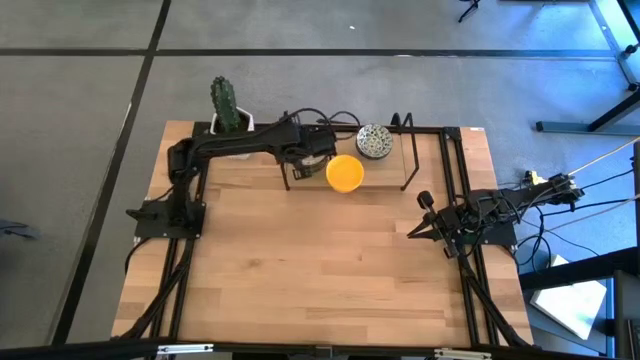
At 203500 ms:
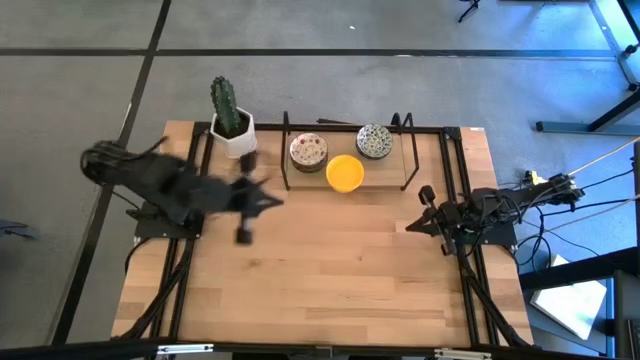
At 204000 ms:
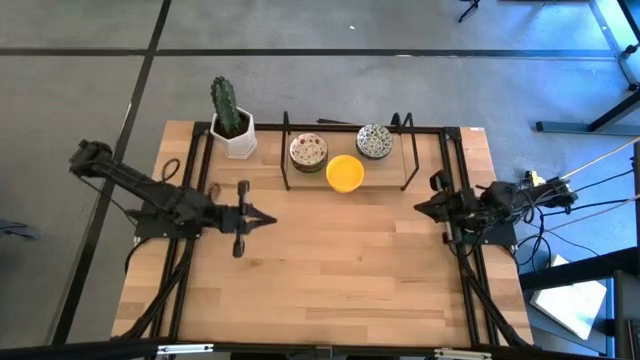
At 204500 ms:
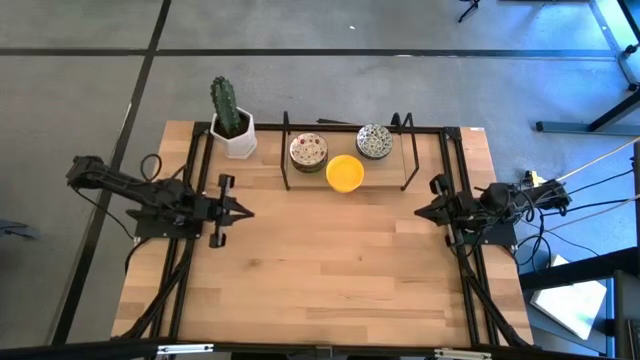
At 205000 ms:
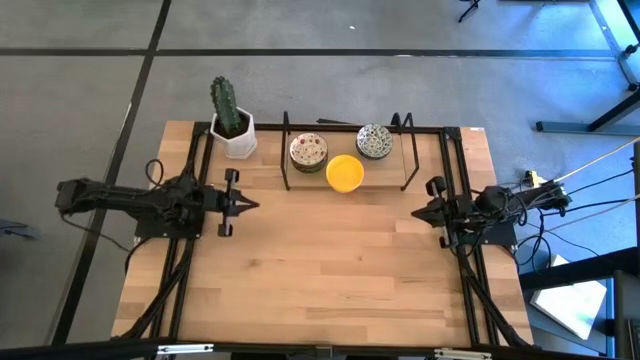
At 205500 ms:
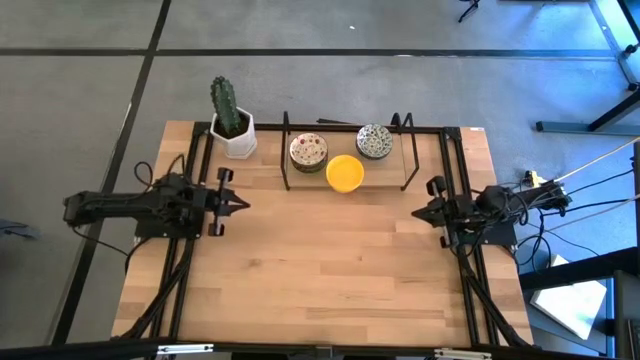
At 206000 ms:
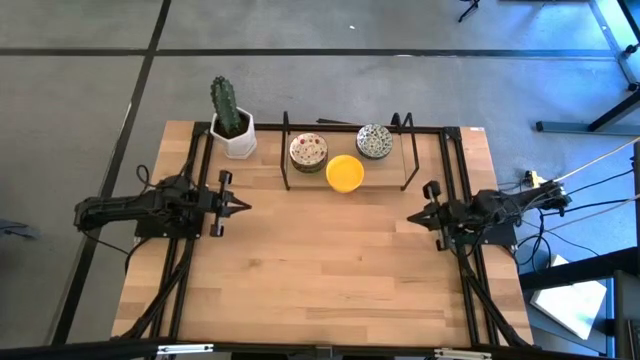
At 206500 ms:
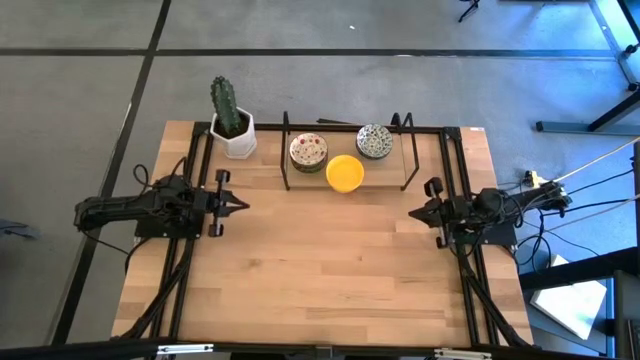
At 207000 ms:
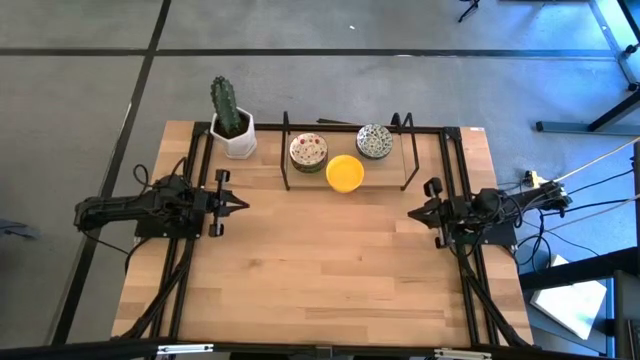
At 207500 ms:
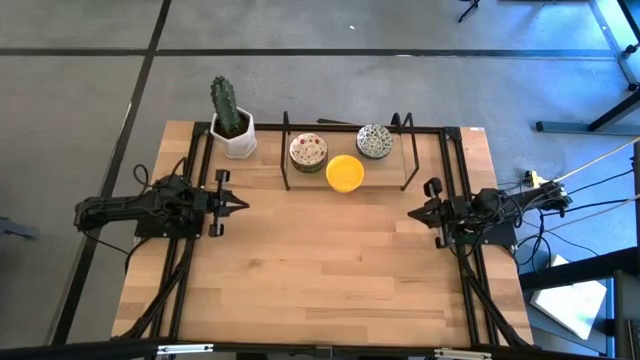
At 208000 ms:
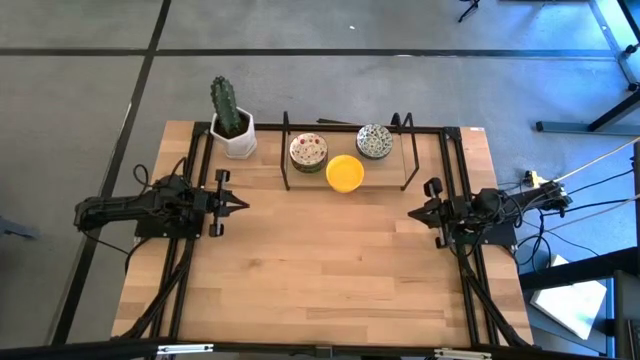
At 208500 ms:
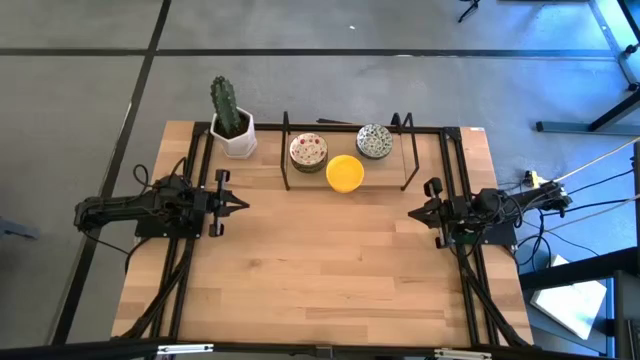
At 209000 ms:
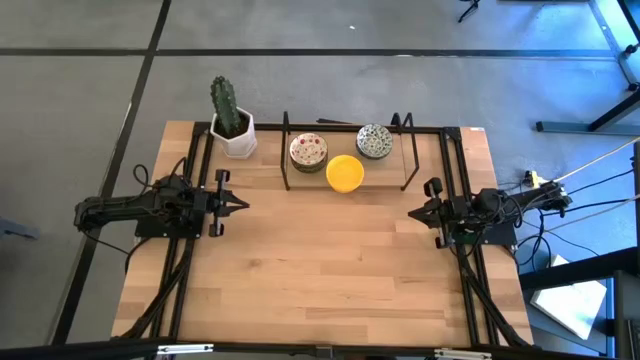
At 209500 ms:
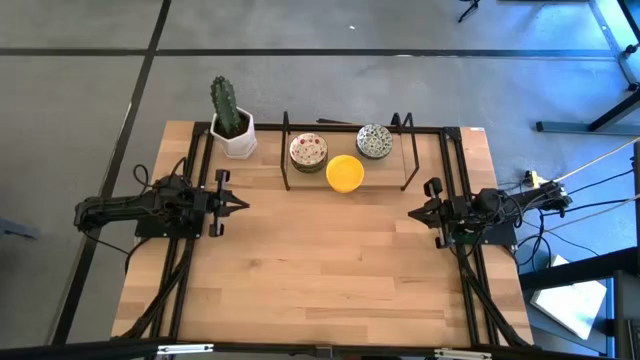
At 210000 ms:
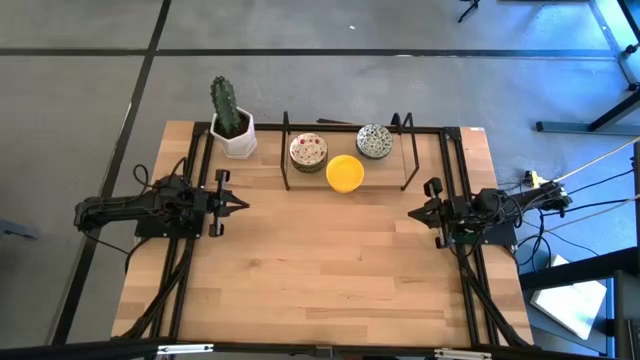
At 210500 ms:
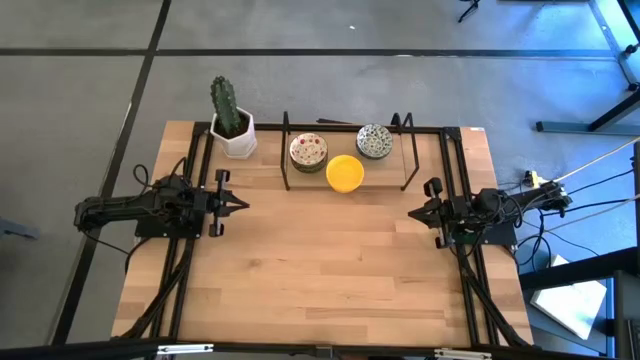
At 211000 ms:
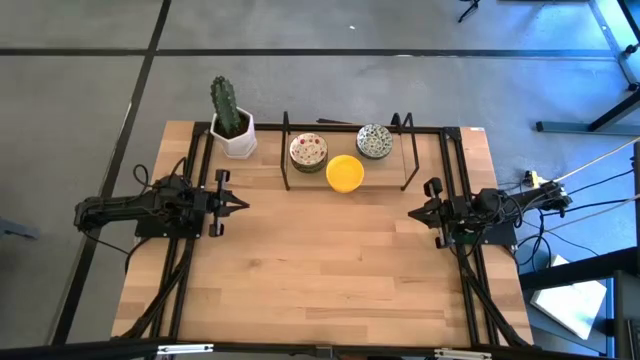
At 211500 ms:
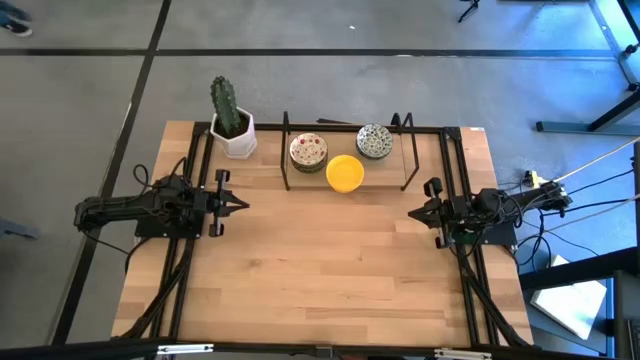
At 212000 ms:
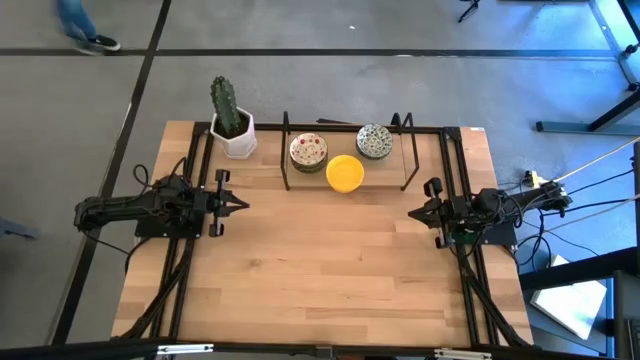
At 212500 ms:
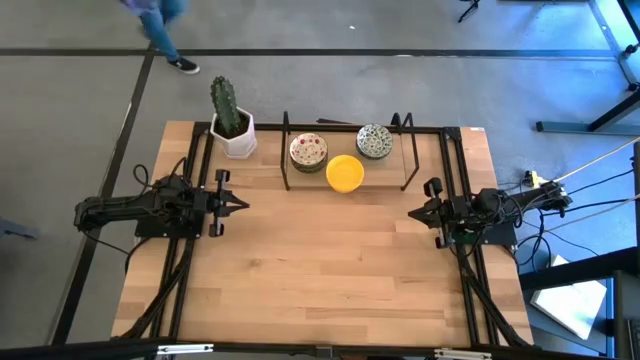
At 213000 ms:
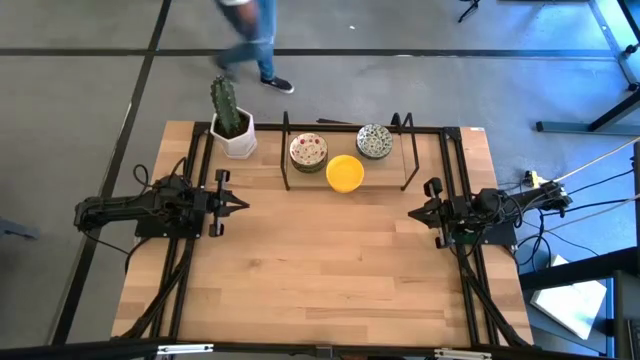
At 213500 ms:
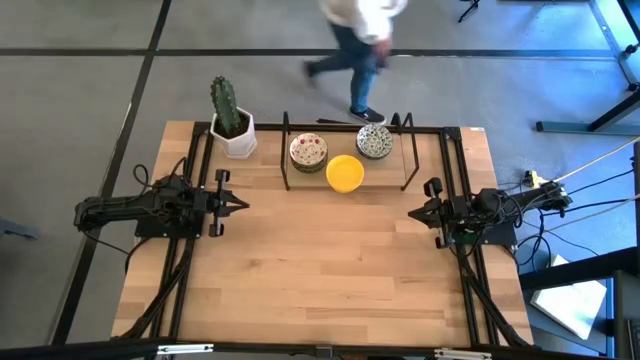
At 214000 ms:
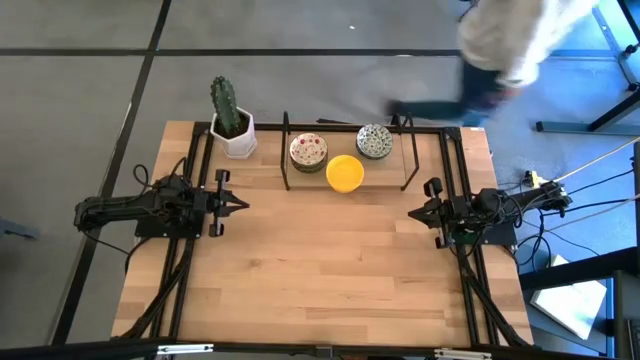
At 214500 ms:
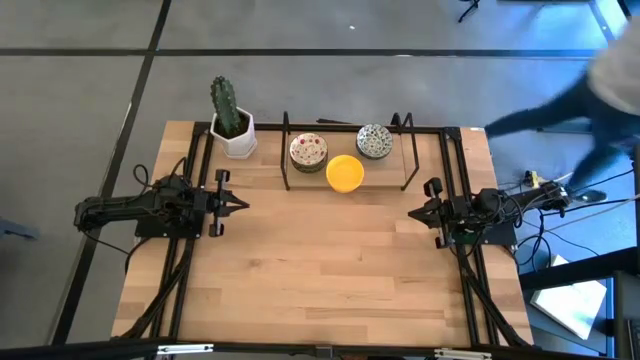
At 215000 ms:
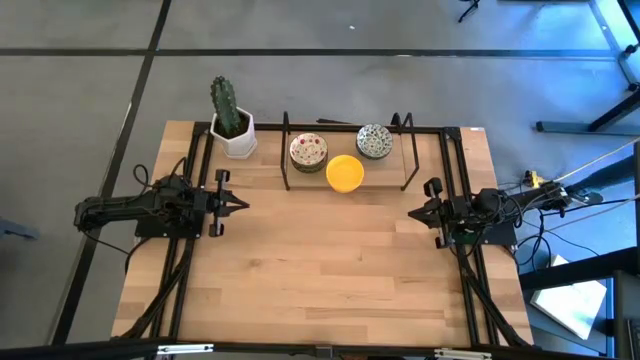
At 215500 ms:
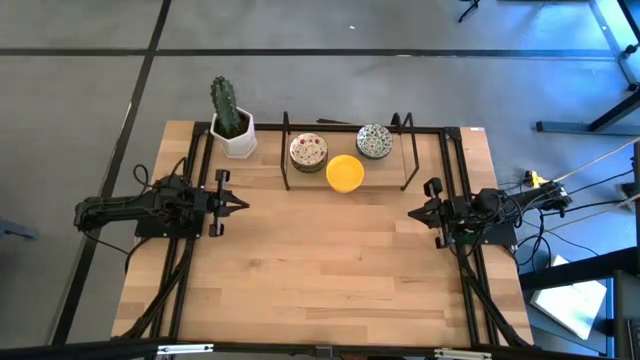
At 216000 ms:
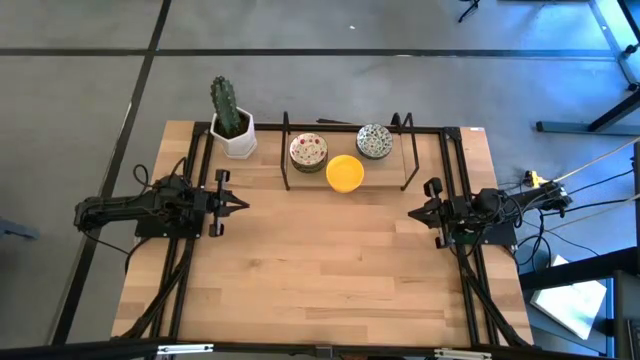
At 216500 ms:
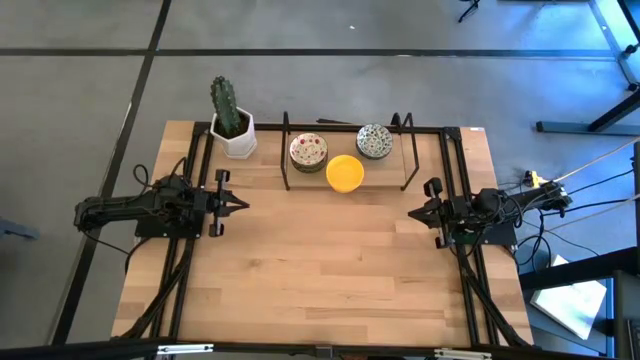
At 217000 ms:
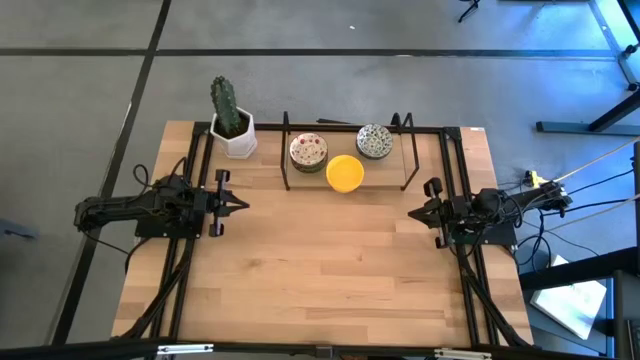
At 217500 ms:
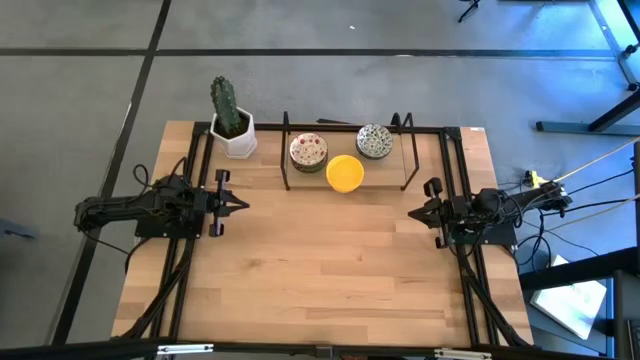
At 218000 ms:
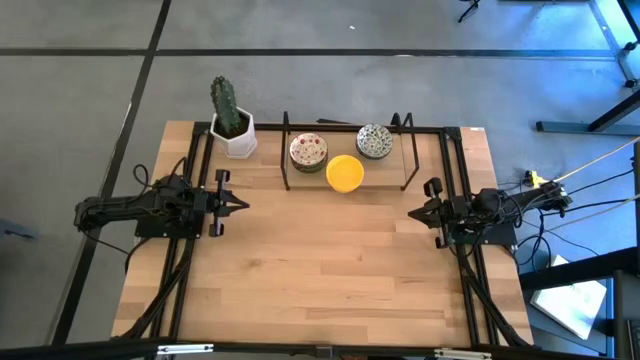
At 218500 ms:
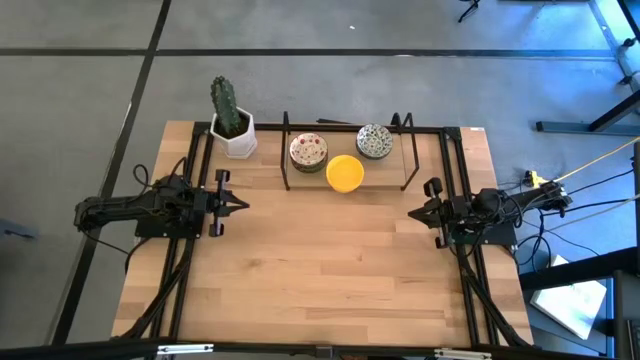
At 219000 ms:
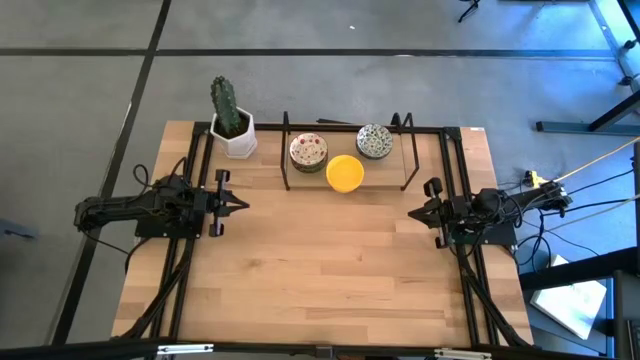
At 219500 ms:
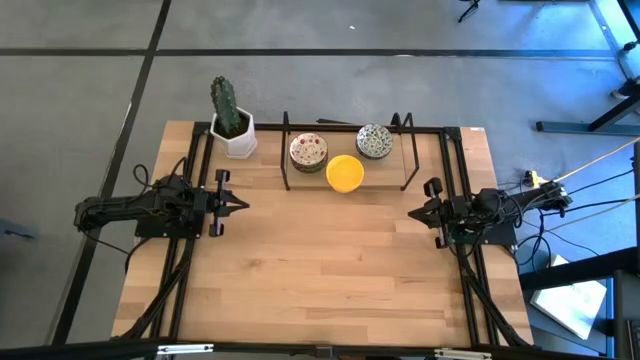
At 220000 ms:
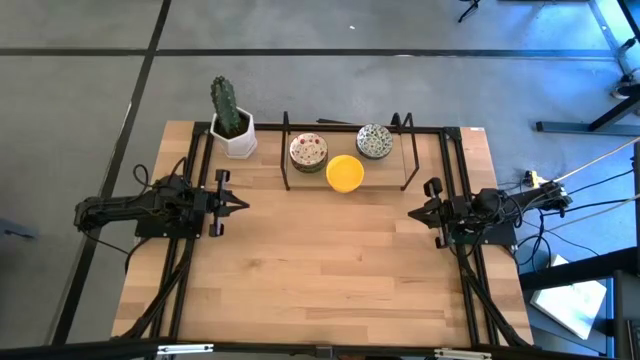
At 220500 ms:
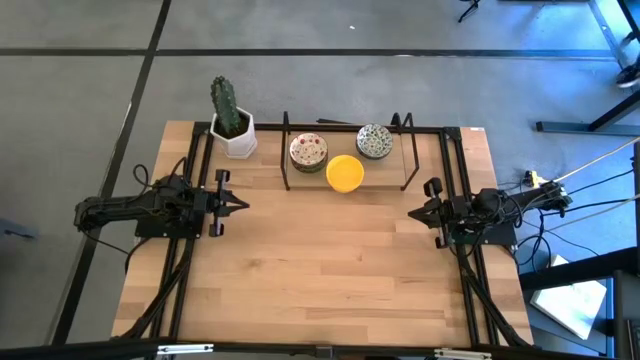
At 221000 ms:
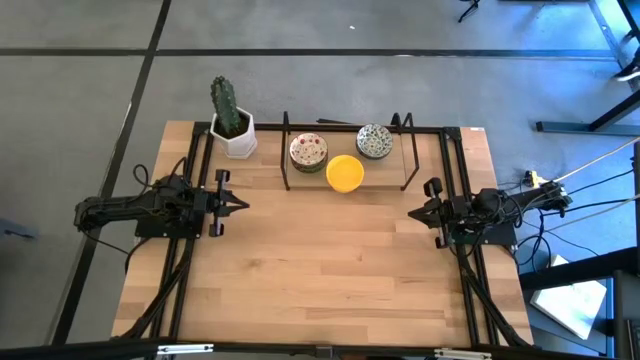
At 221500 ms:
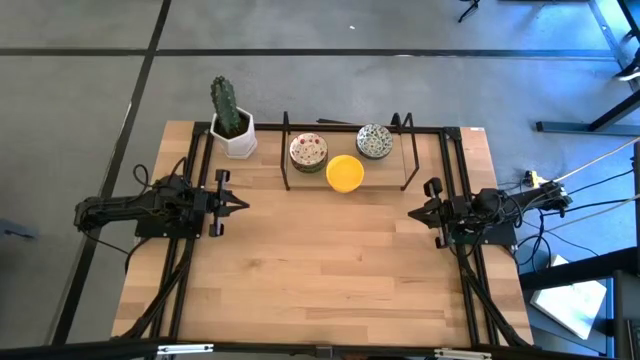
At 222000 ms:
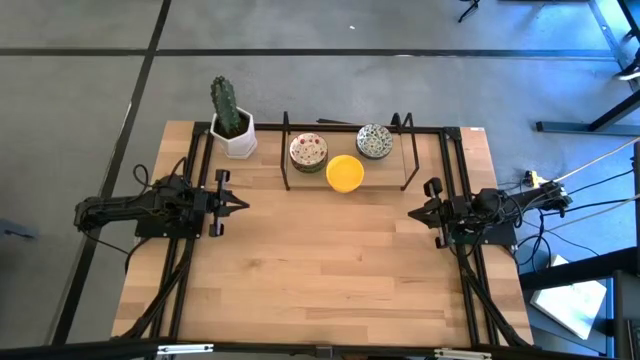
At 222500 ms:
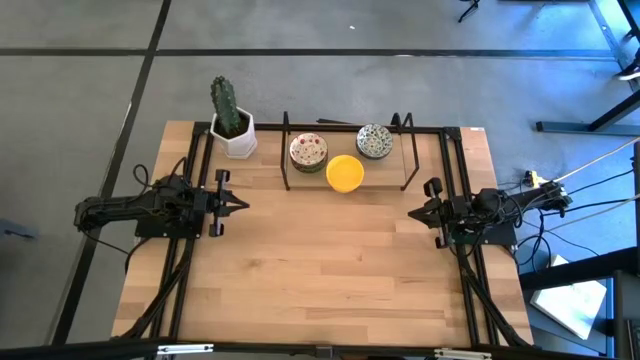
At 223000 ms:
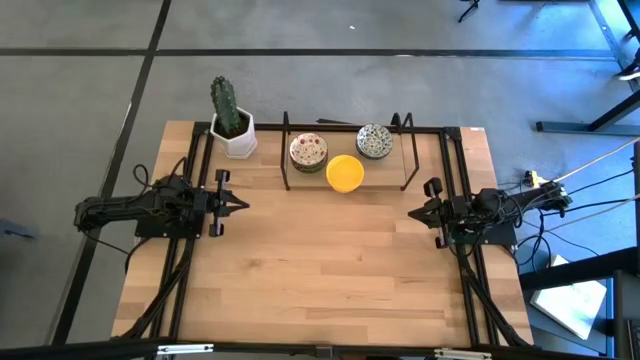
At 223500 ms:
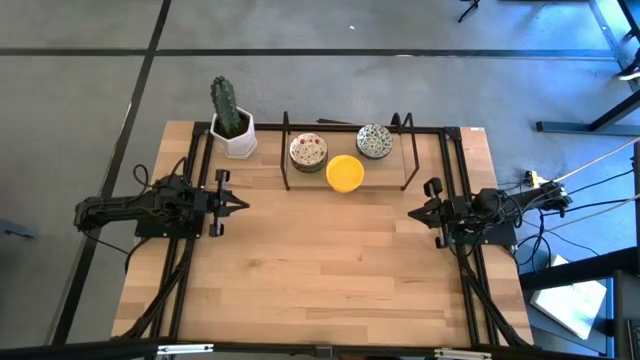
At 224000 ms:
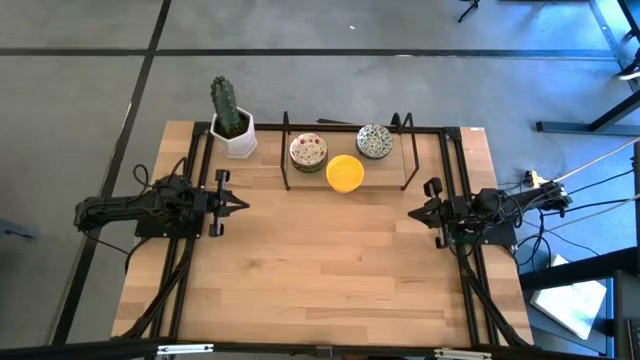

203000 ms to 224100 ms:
Task: Pick & Place Mini bowls
Return to Home Position
